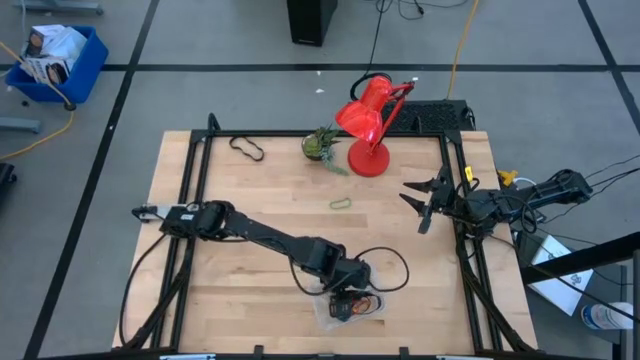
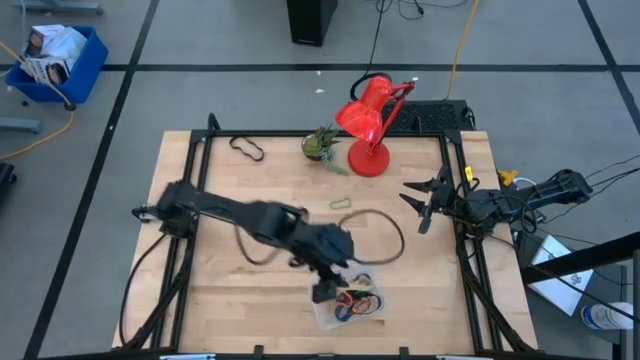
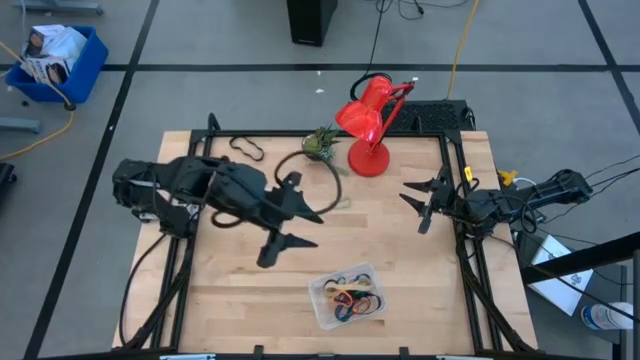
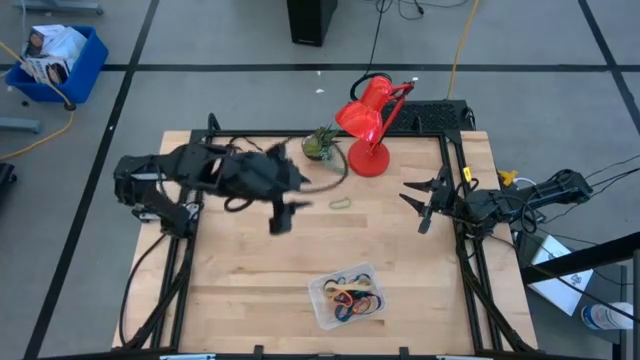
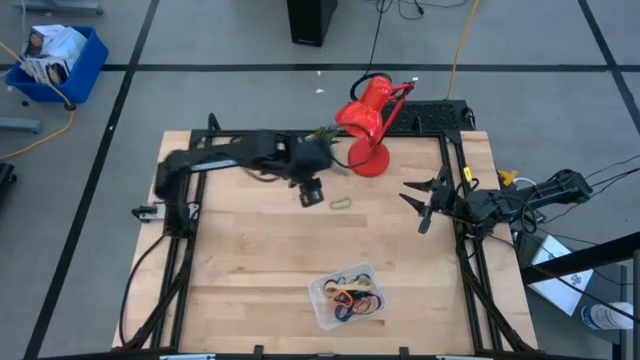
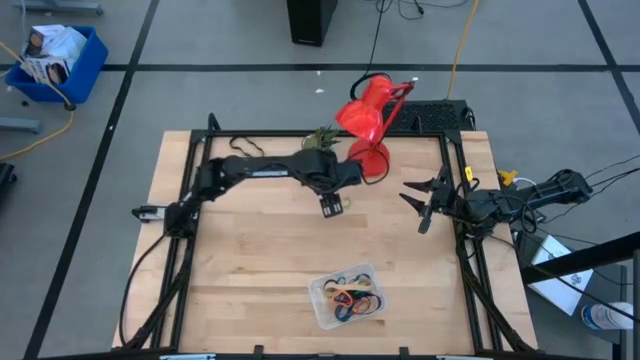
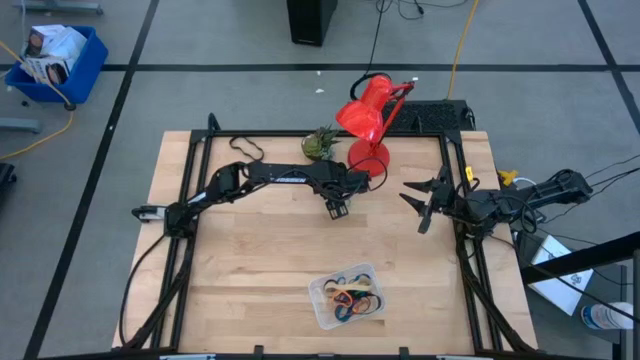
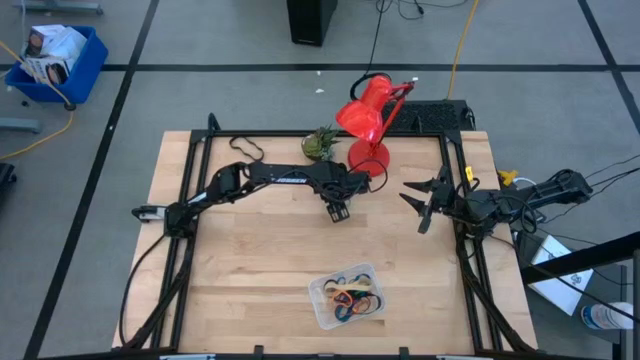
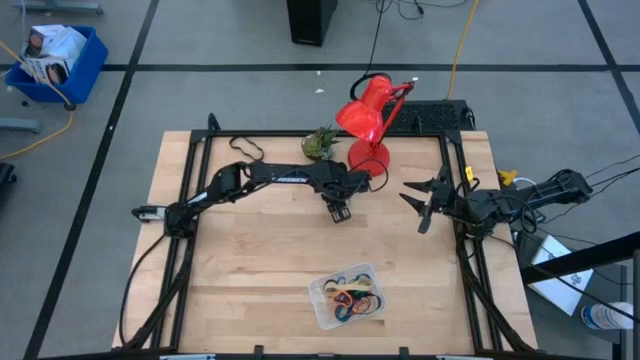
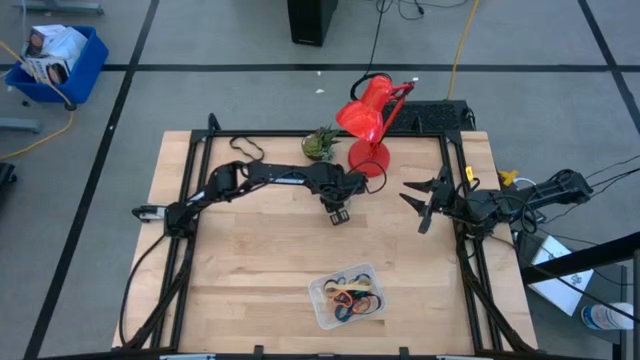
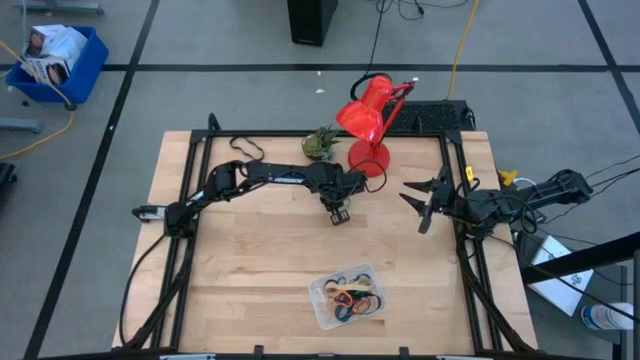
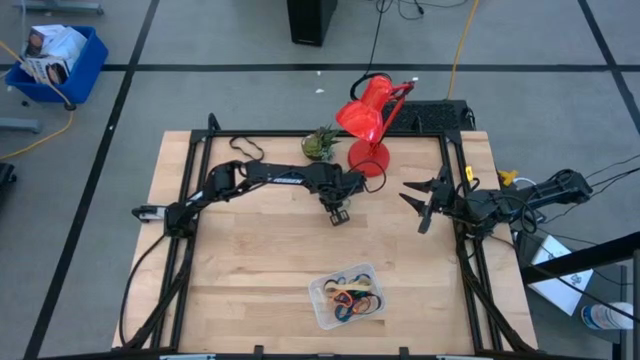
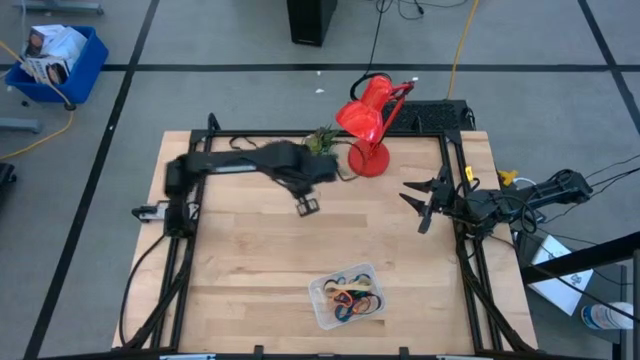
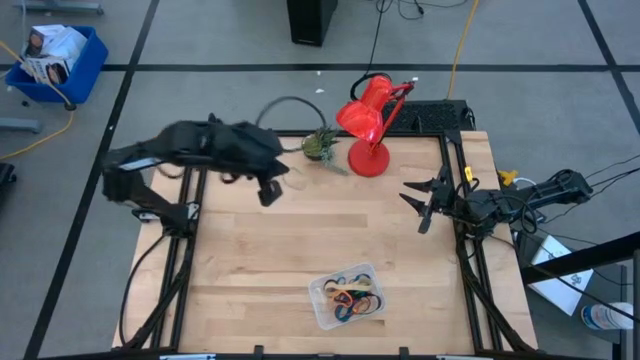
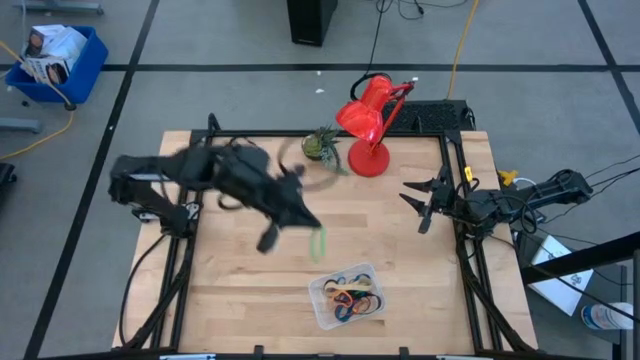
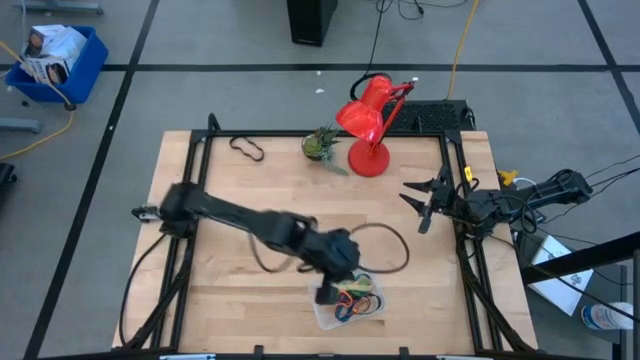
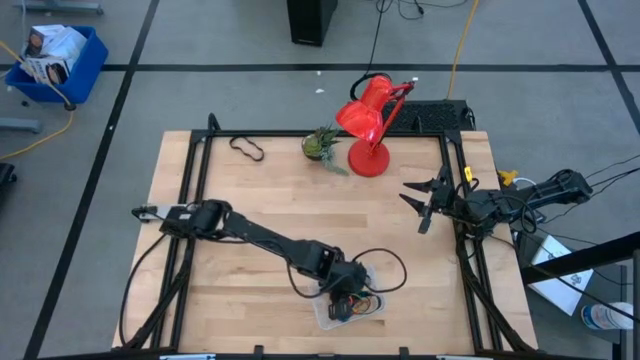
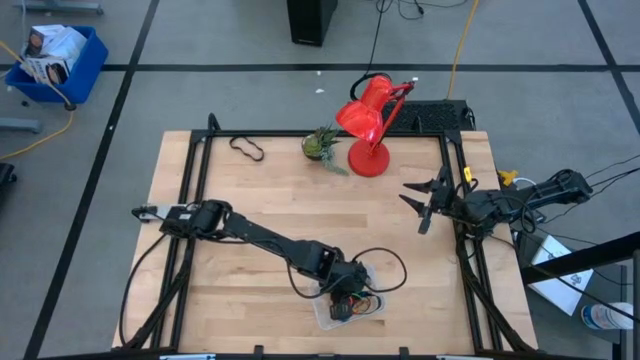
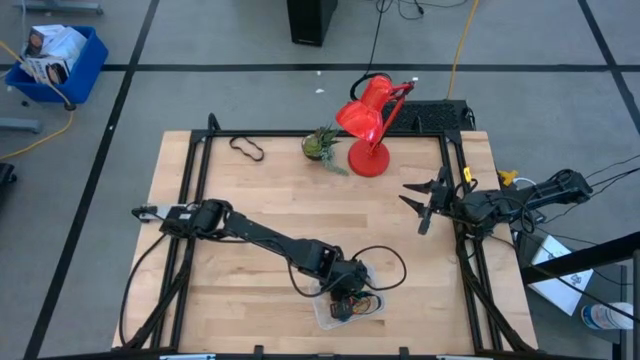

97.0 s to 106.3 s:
Task: Pick and place rubber bands into bin
Put the green rubber band into the transparent container

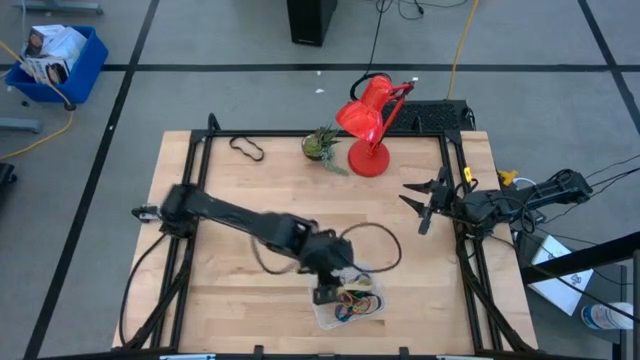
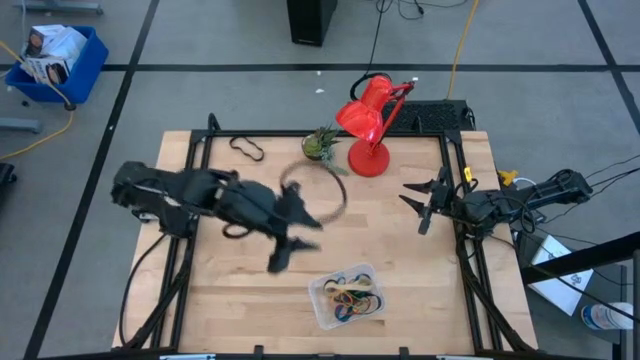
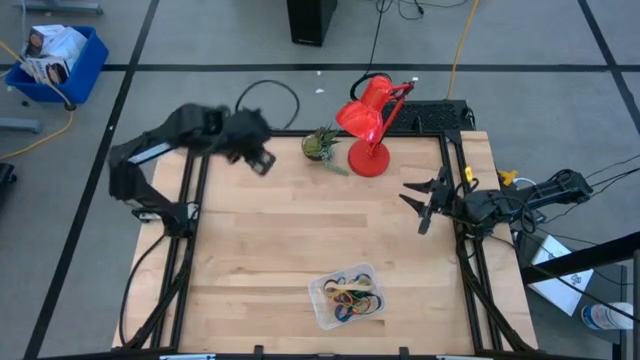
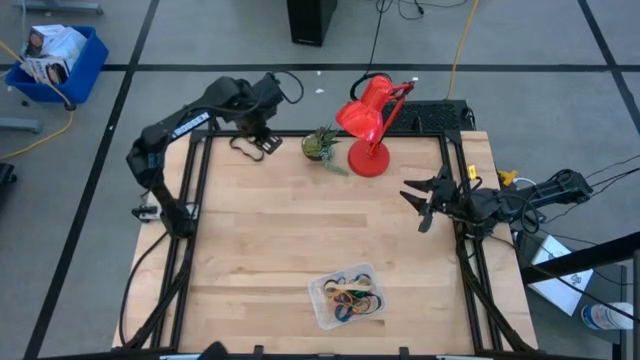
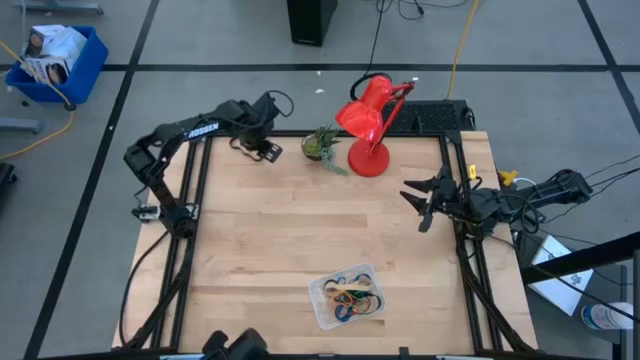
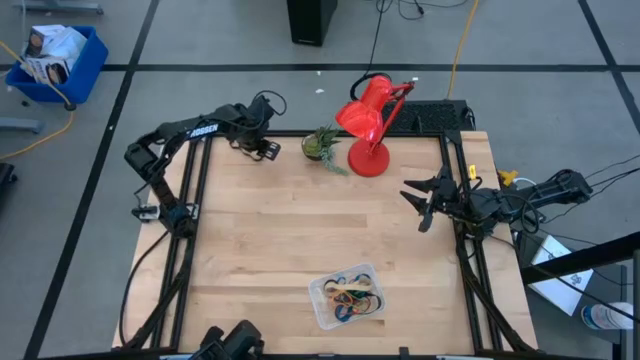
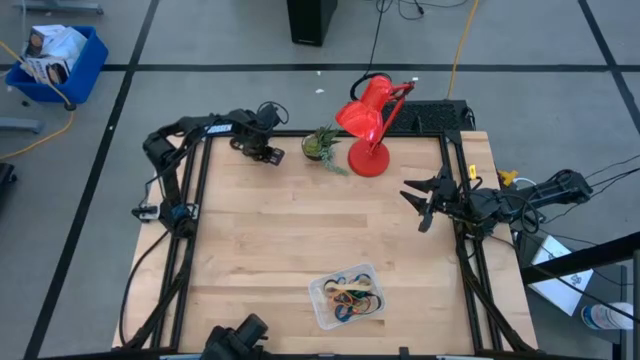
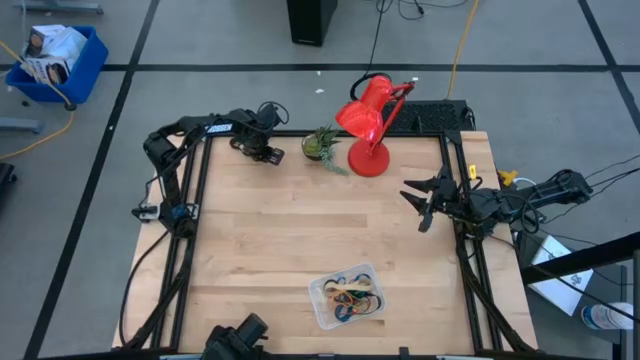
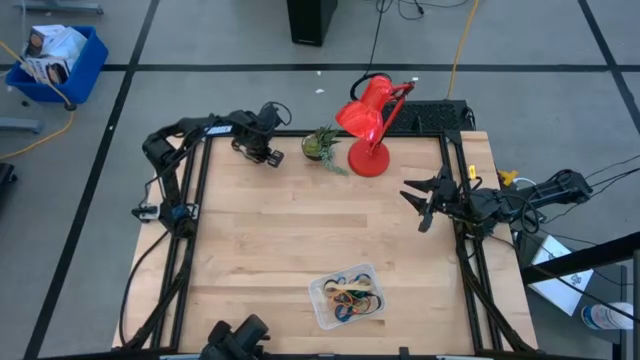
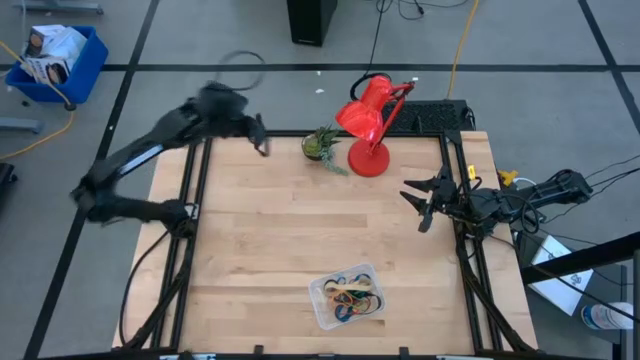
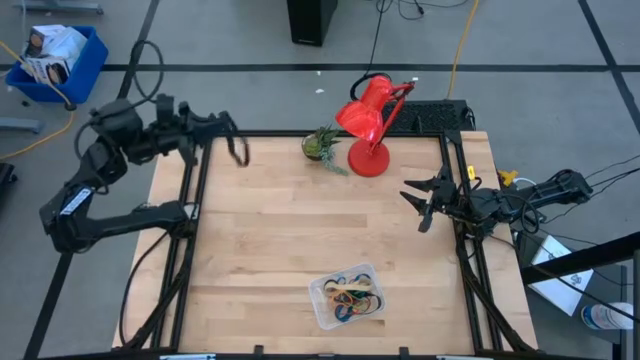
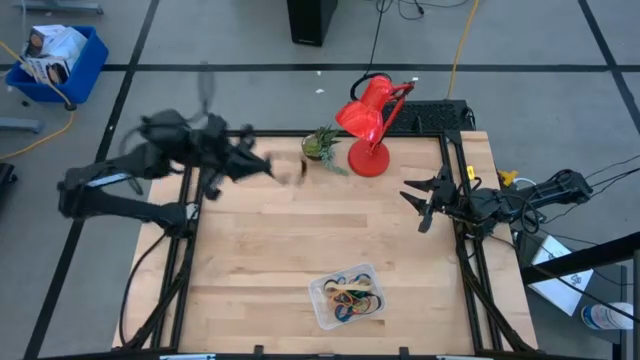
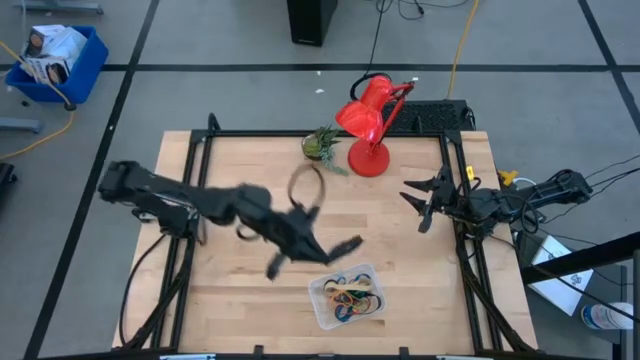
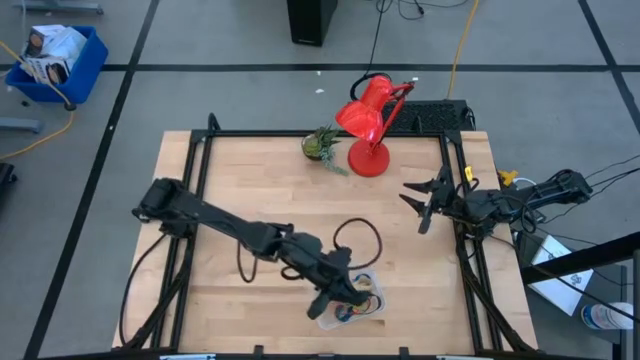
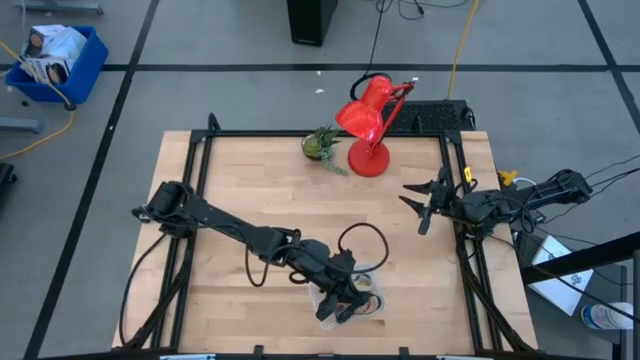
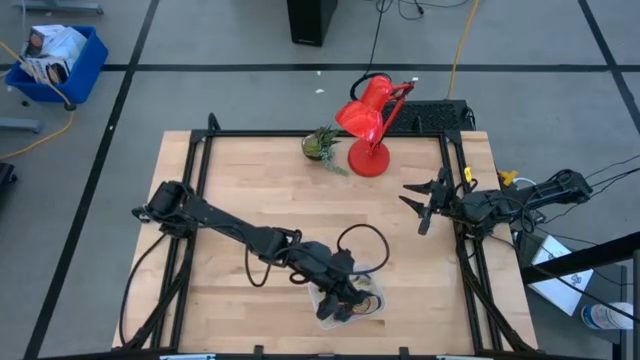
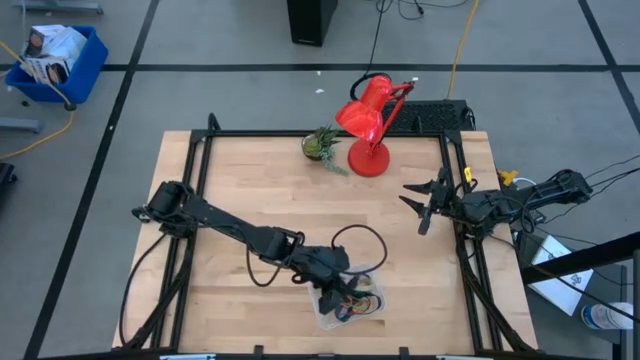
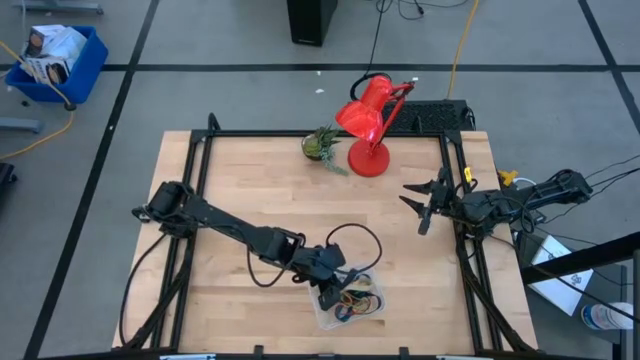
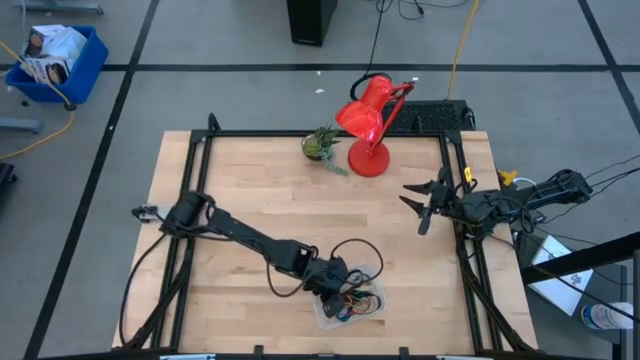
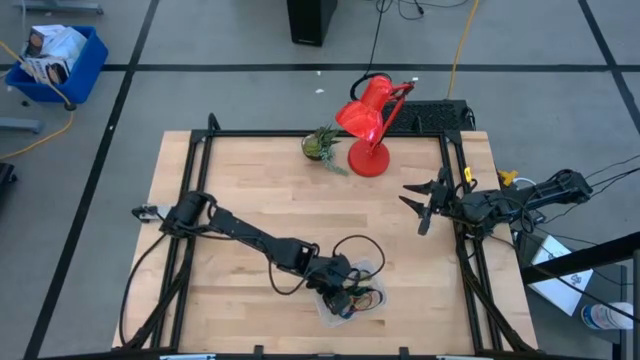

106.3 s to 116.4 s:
Put the black rubber band into the transparent container

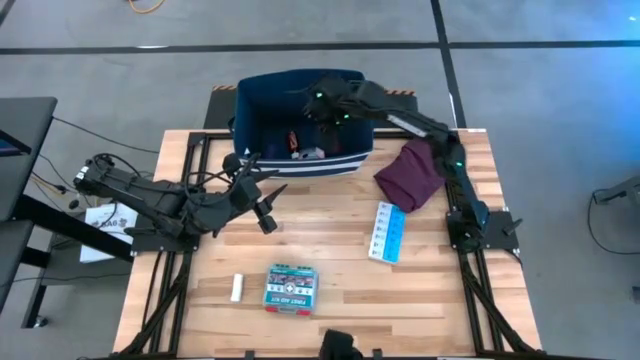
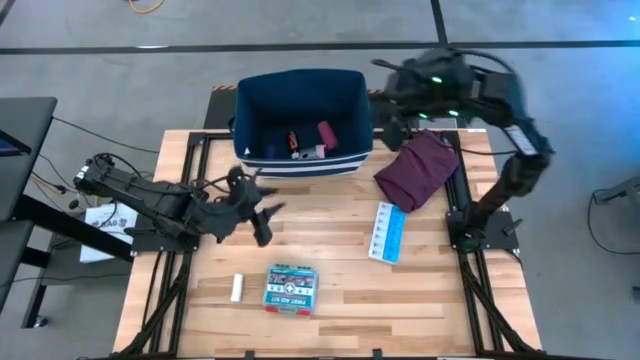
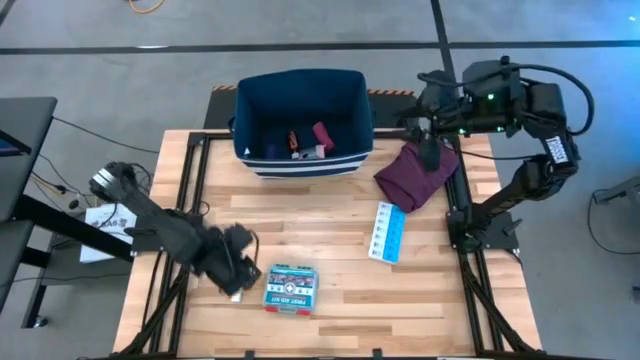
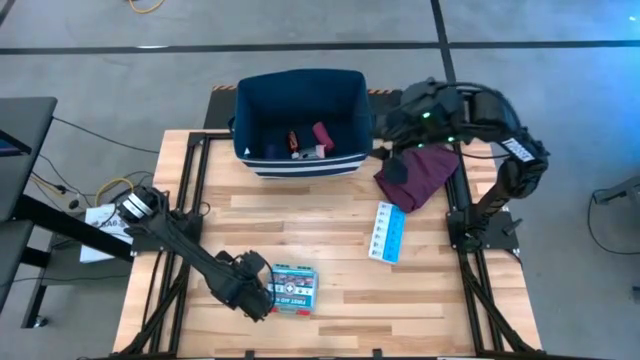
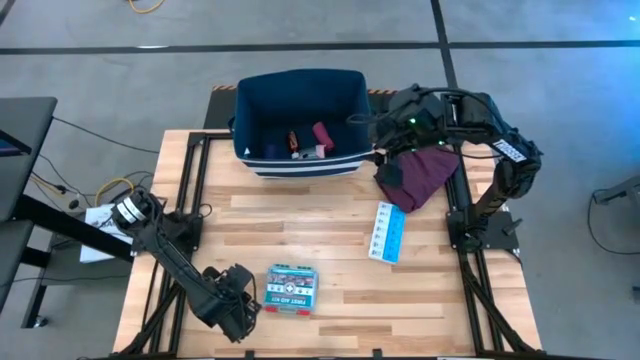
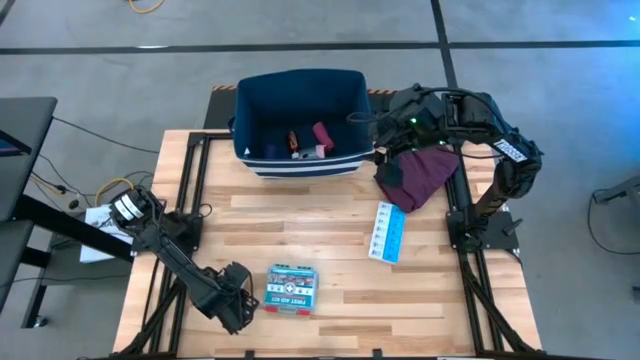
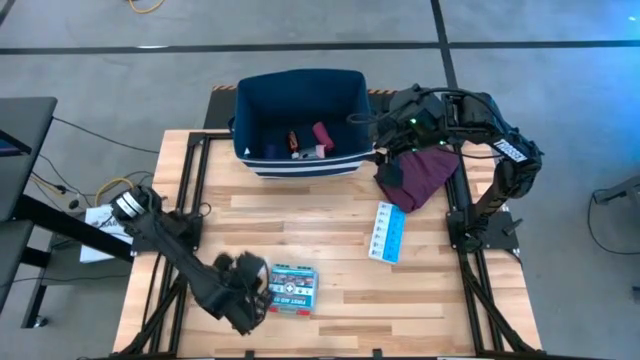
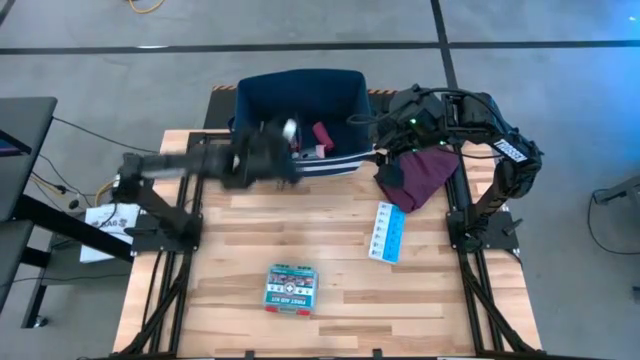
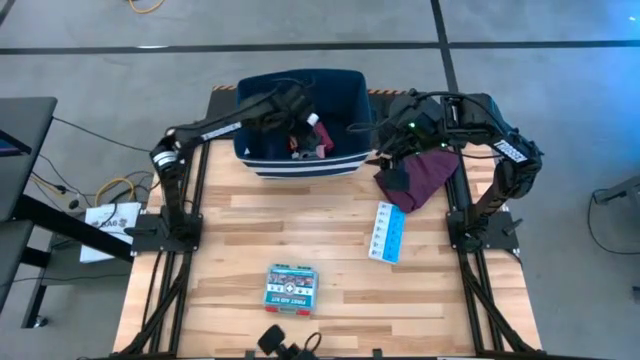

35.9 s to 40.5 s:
Task: Pick & place medical supplies in basket/bin
Put the white rolled gauze into the blue bin
